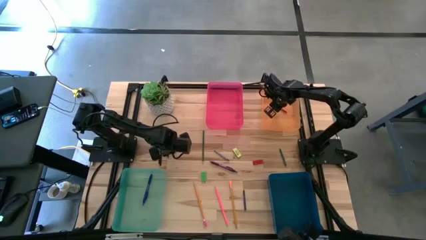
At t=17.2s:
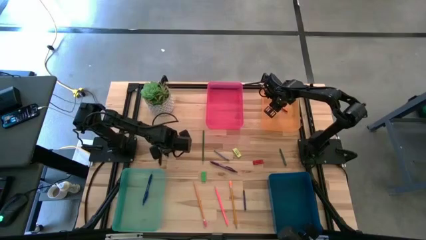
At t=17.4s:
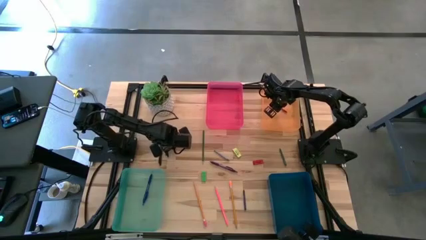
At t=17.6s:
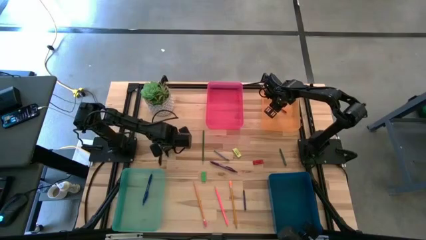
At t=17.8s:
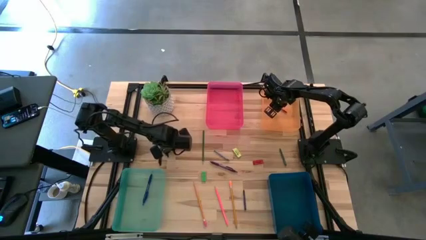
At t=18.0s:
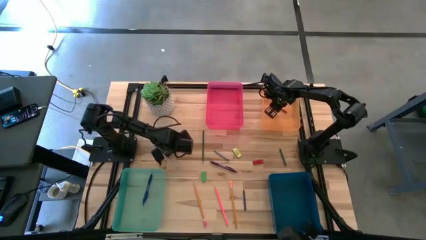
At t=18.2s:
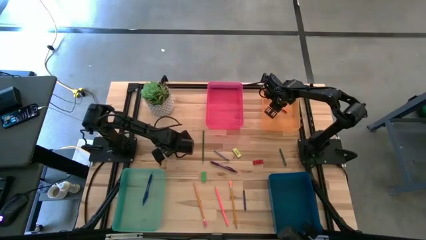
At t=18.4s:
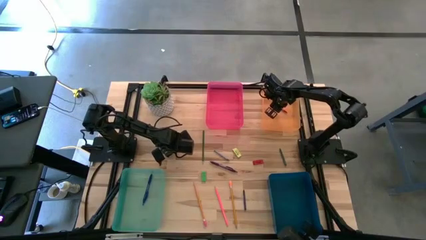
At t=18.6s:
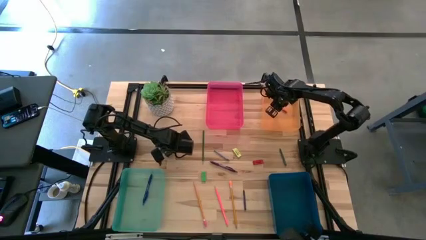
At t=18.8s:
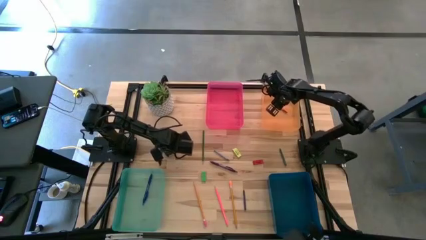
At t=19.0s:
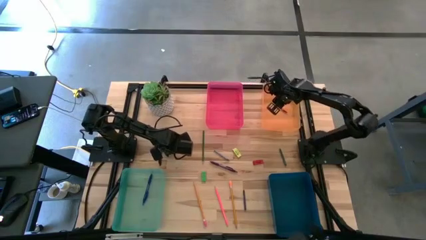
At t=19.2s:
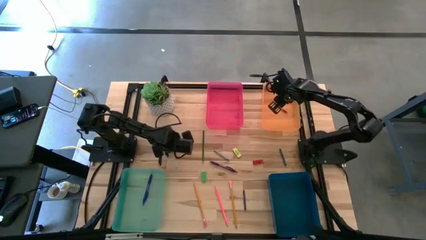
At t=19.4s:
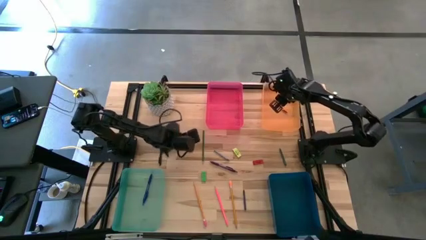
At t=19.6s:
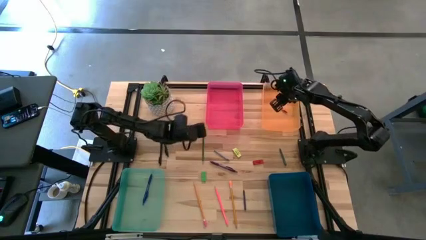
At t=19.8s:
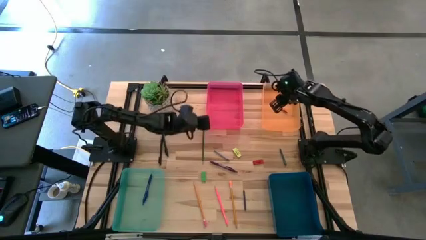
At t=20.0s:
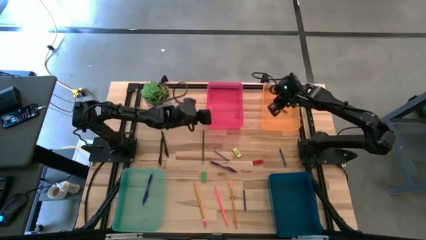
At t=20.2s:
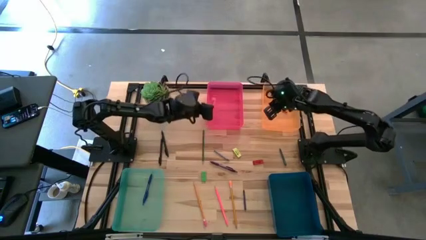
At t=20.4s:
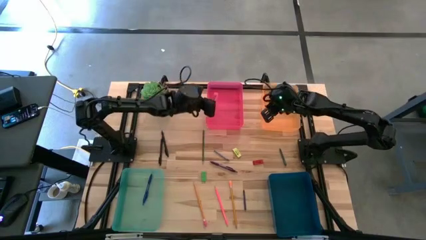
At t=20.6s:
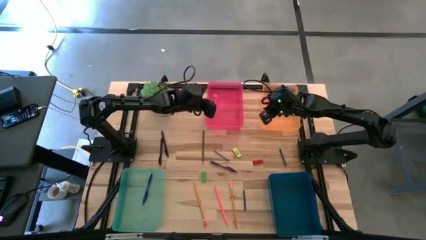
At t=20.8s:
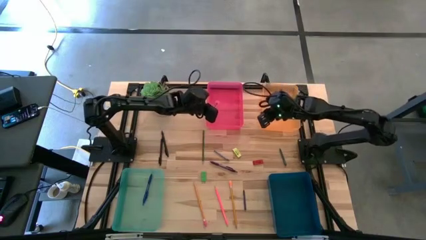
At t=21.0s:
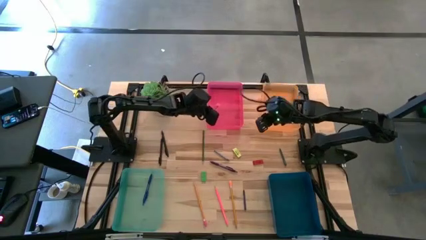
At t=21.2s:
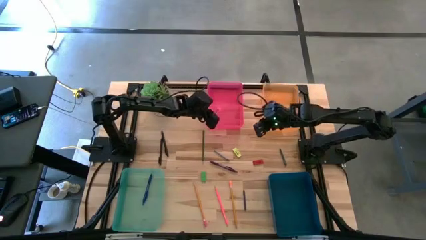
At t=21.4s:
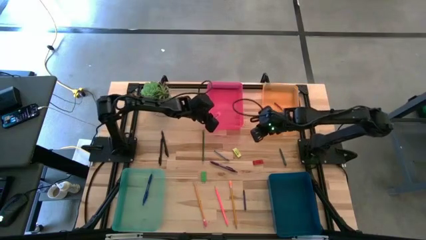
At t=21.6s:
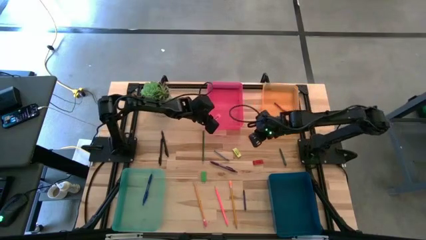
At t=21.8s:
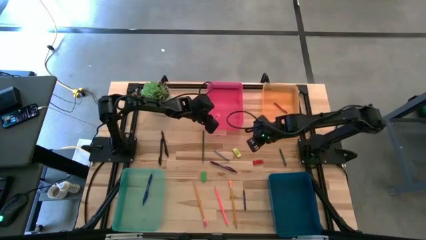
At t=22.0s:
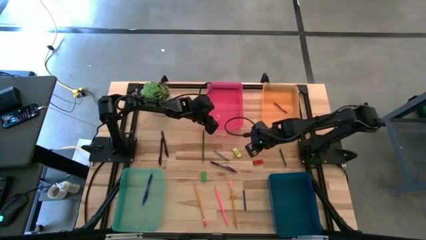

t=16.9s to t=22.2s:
Task: Sort crayons/erasers/pens/pencils in bins
Put the pink eraser into the pink bin

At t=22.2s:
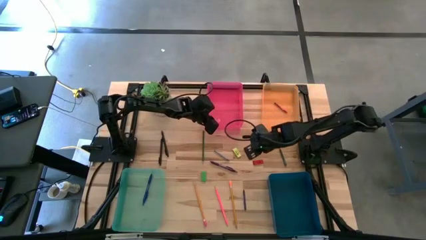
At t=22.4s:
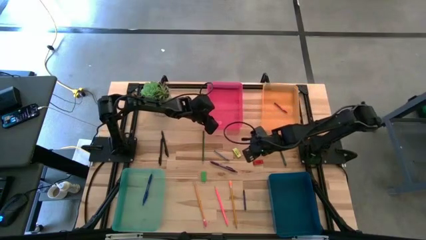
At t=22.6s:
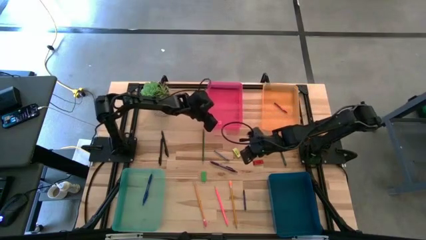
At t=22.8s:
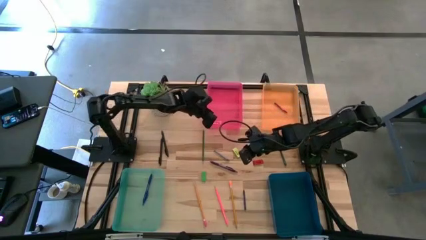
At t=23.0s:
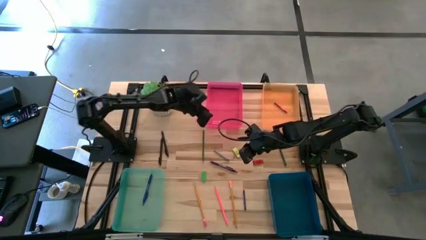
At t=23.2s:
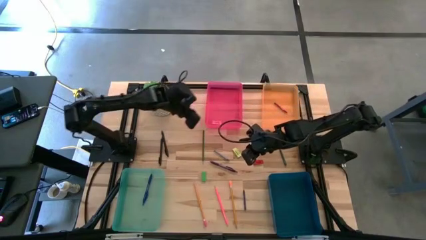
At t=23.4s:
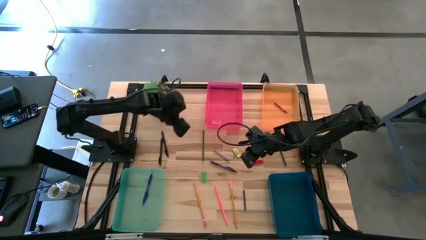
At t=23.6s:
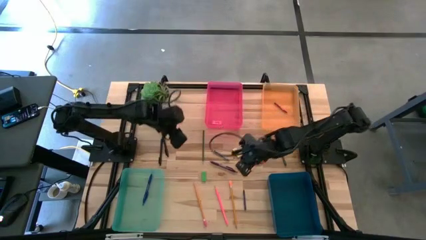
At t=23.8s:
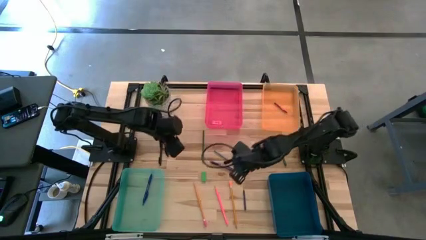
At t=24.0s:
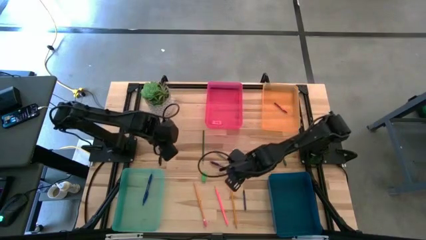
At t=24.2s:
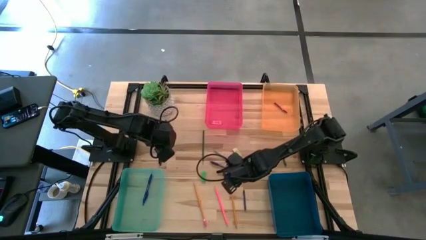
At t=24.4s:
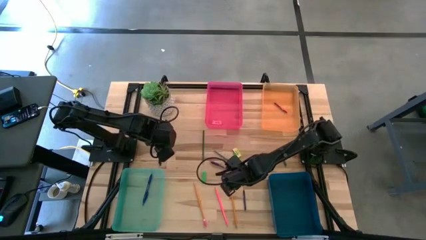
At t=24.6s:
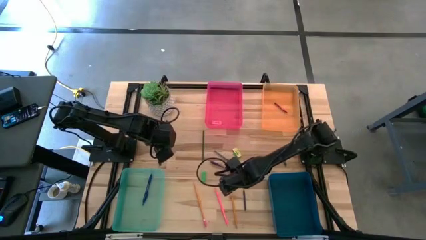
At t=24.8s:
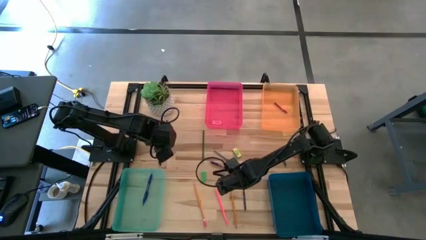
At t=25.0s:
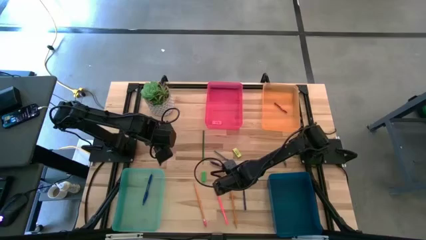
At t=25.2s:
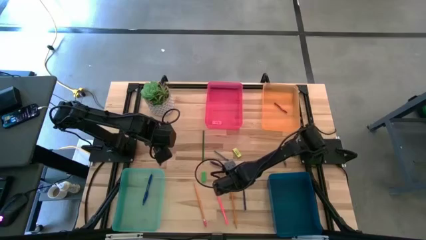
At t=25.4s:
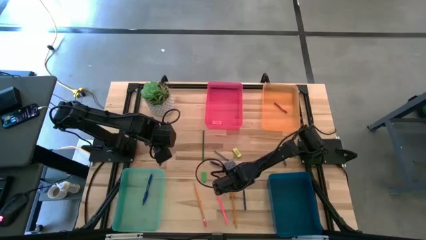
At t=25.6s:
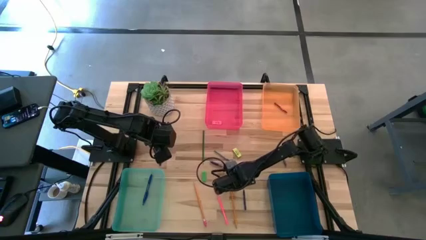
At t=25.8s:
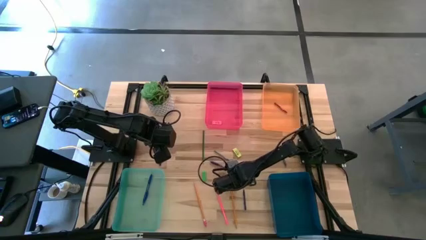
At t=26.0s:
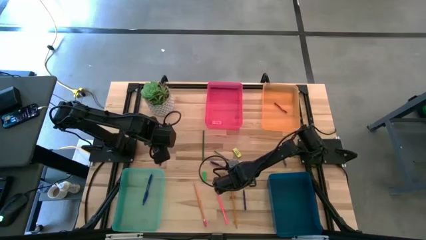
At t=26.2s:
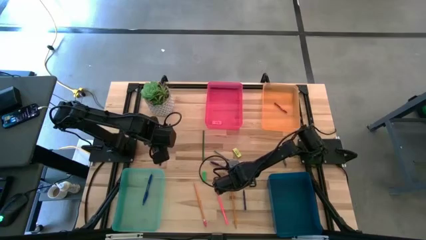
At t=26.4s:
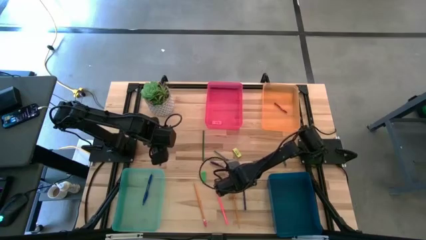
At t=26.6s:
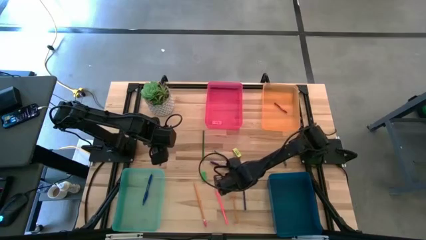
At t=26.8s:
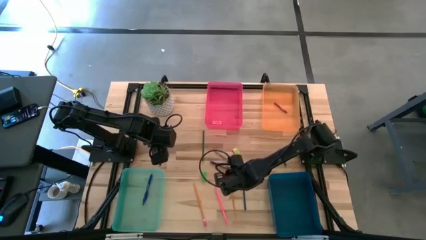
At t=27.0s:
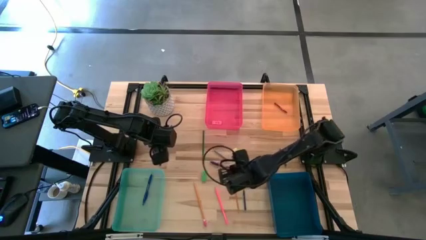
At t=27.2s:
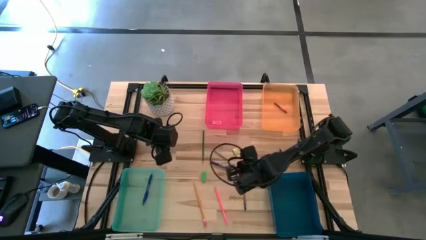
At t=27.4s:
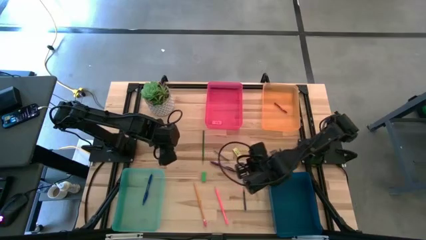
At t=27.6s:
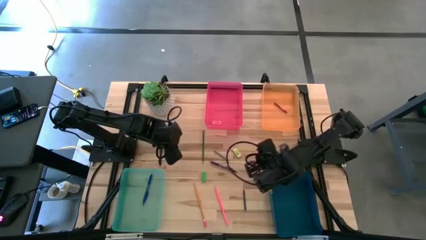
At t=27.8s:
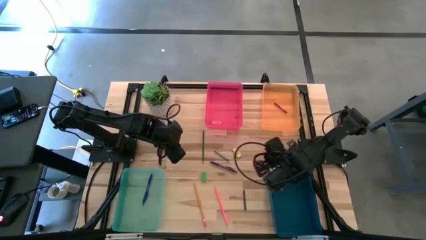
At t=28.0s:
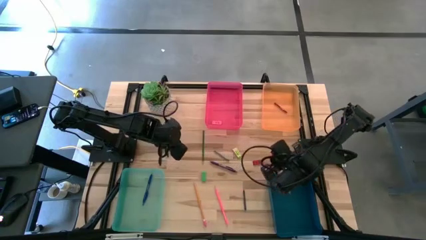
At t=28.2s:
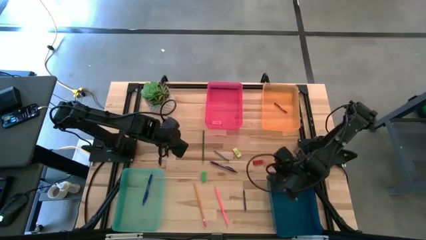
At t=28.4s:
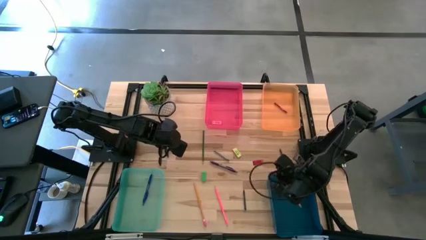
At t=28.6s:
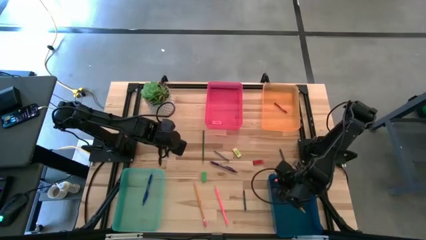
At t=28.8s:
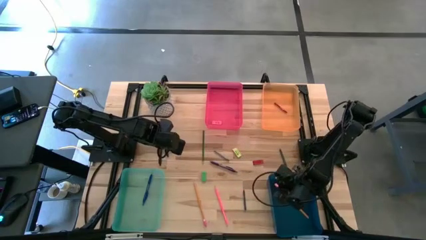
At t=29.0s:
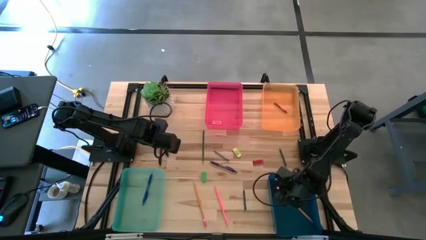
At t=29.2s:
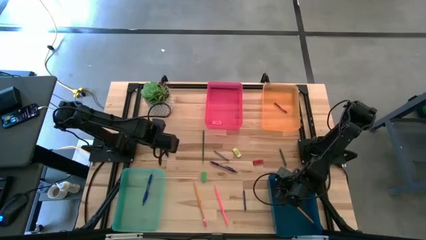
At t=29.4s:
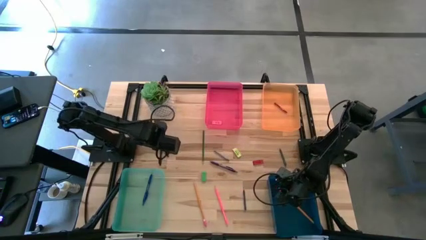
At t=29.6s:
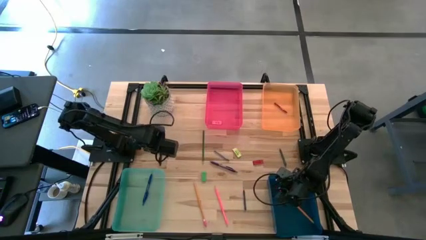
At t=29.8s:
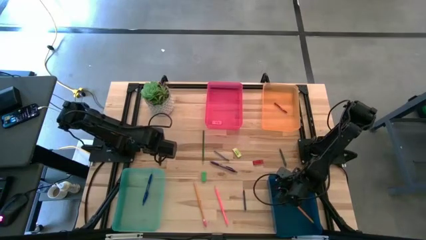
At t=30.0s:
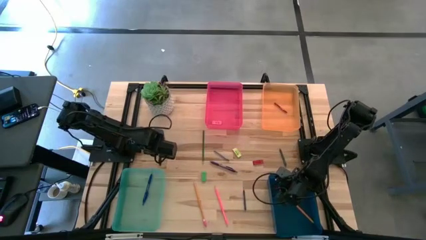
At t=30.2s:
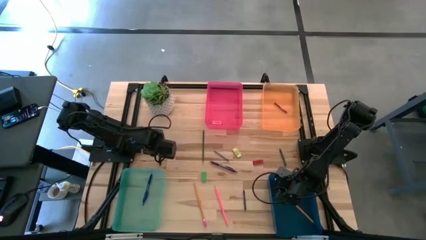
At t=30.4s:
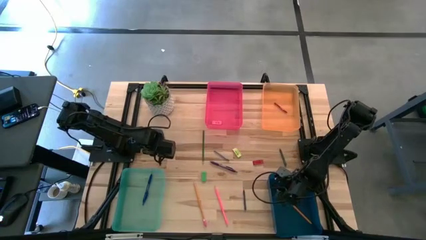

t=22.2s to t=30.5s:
Put the right yellow pencil into the blue bin

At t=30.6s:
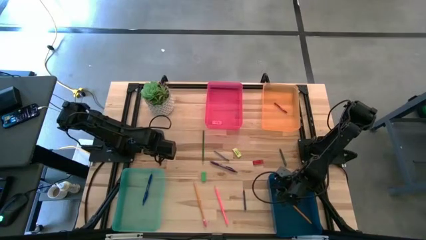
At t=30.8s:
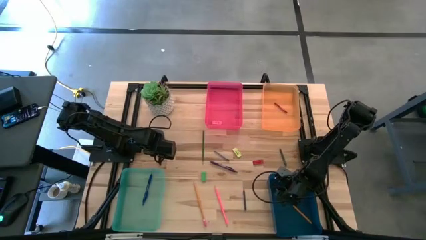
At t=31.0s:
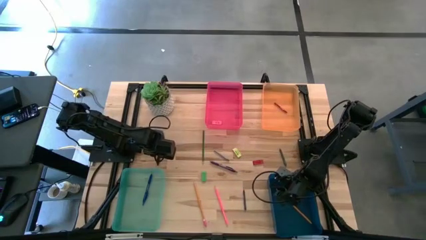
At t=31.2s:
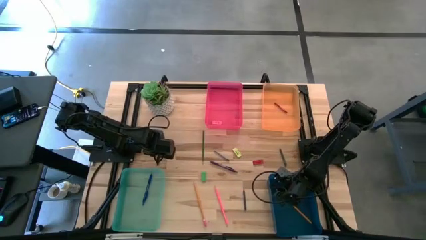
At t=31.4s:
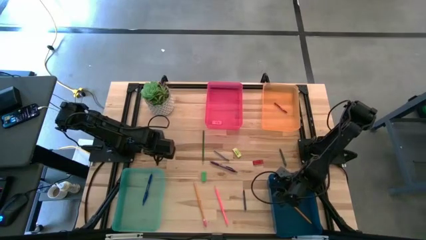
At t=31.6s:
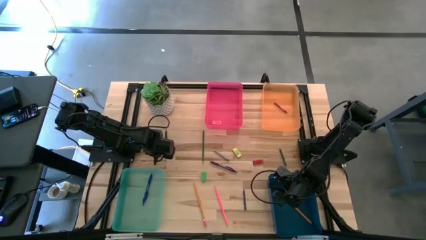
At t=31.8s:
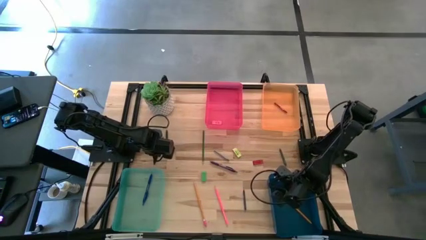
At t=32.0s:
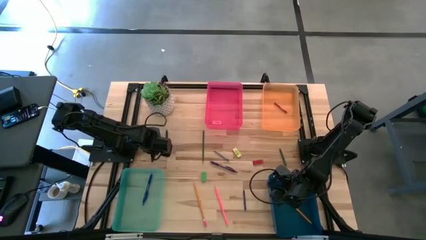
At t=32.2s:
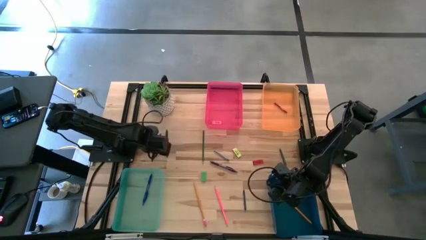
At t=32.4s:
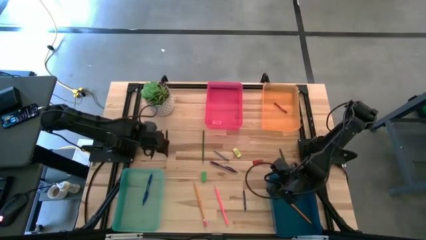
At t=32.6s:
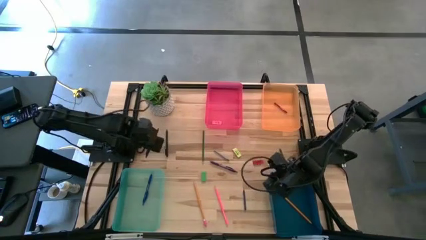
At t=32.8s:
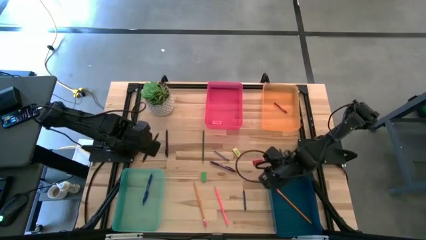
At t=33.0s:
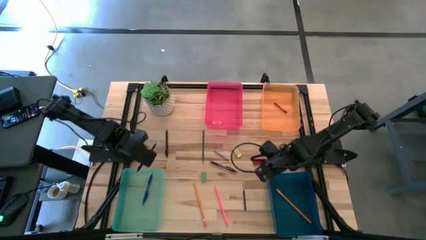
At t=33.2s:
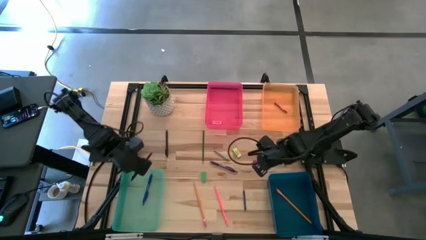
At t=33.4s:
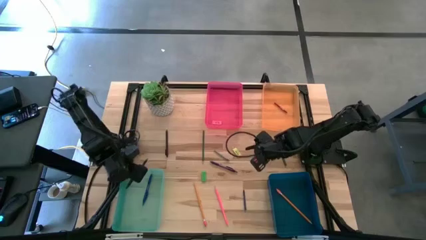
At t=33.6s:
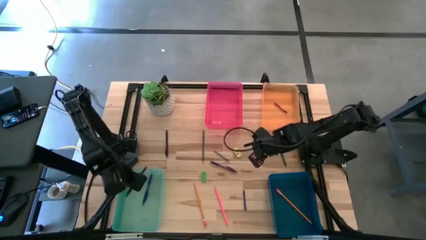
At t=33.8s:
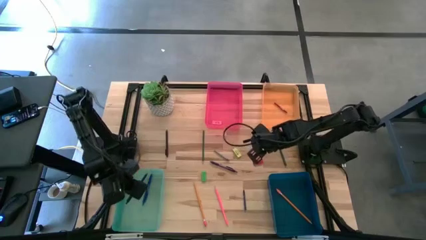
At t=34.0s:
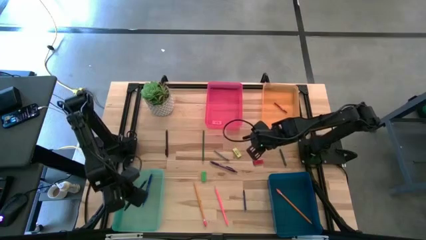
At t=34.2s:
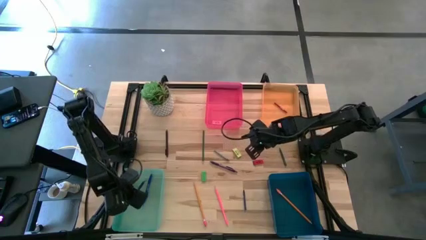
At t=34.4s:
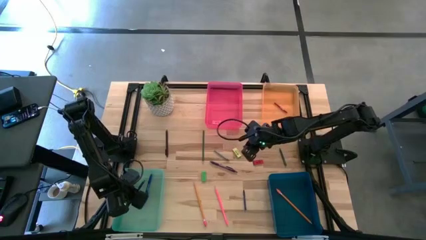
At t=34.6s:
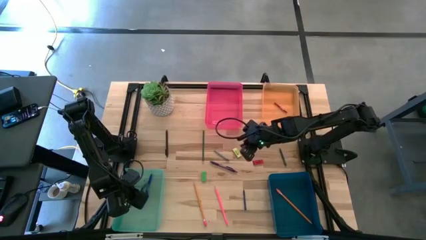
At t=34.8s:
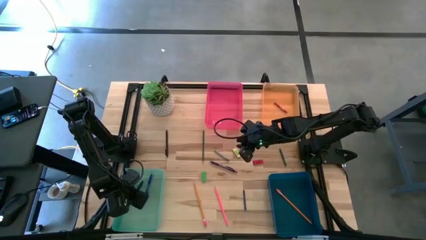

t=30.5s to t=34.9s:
Put the left black ballpen into the green bin
